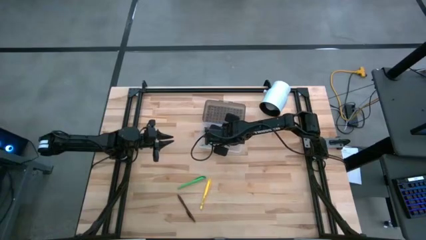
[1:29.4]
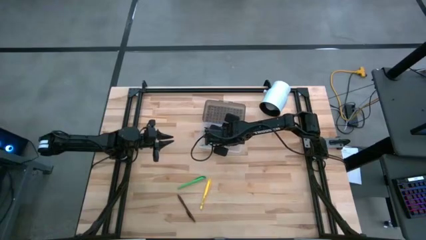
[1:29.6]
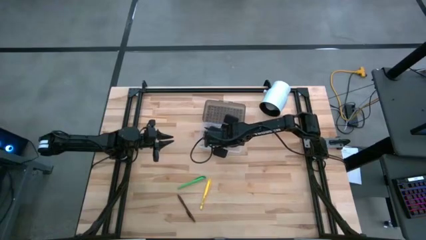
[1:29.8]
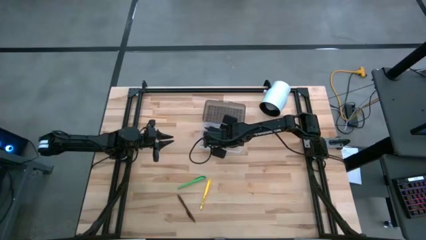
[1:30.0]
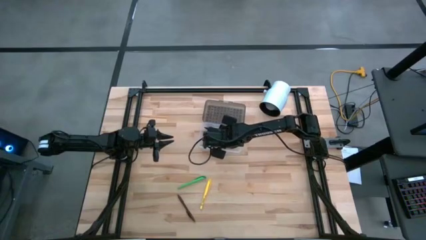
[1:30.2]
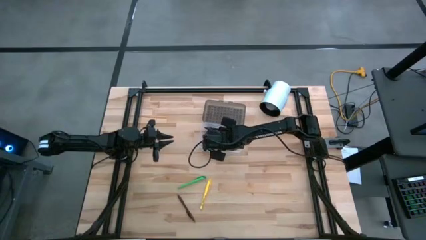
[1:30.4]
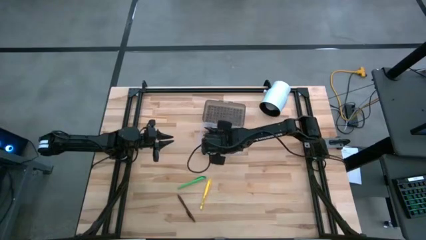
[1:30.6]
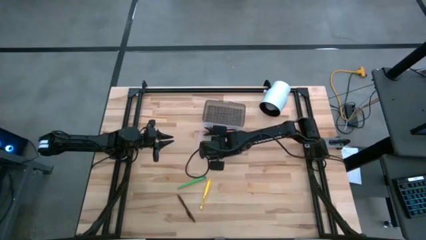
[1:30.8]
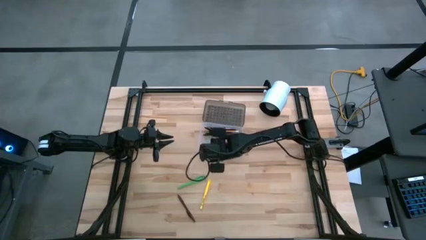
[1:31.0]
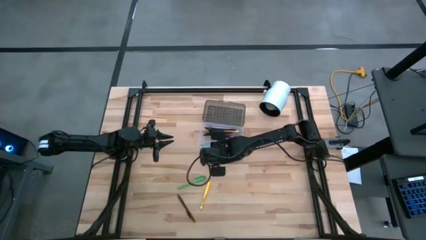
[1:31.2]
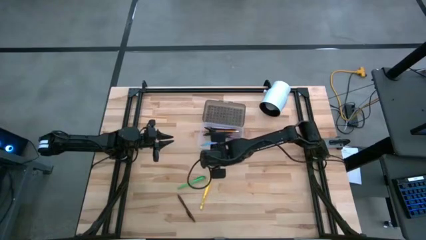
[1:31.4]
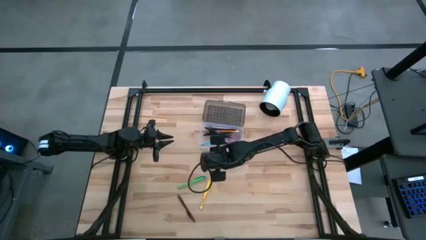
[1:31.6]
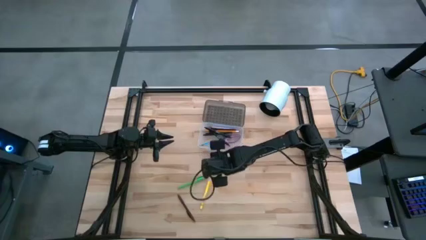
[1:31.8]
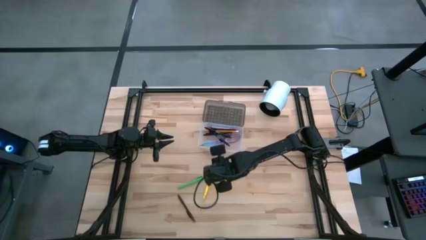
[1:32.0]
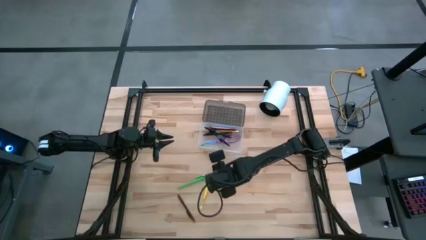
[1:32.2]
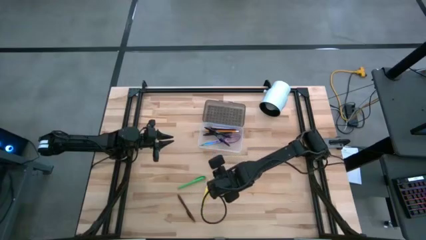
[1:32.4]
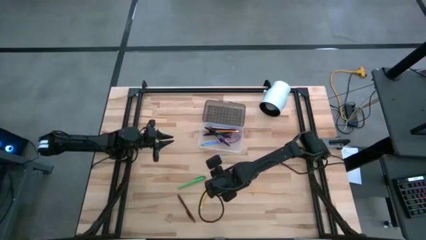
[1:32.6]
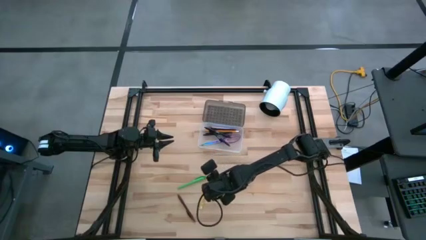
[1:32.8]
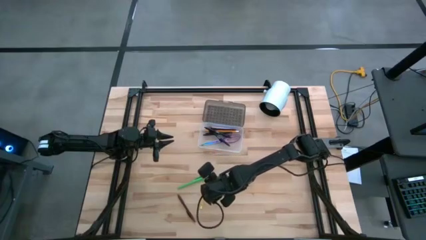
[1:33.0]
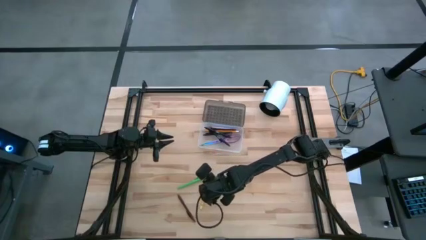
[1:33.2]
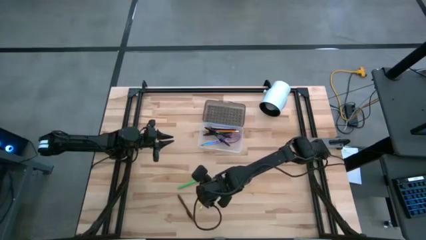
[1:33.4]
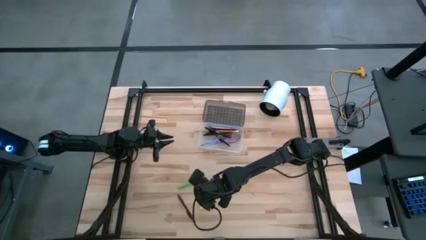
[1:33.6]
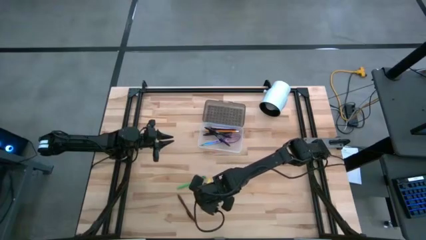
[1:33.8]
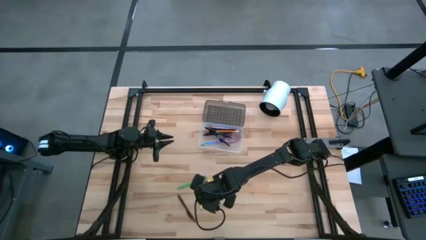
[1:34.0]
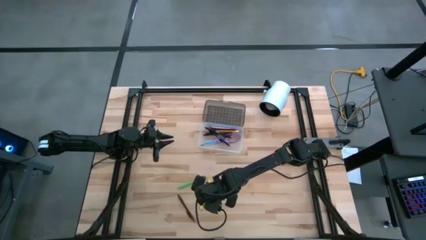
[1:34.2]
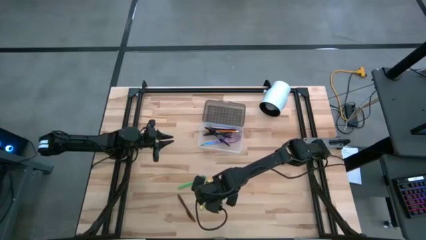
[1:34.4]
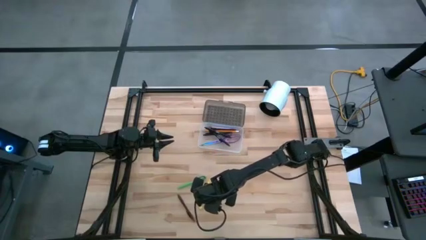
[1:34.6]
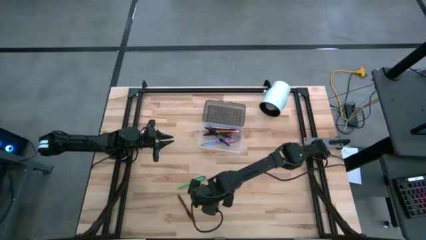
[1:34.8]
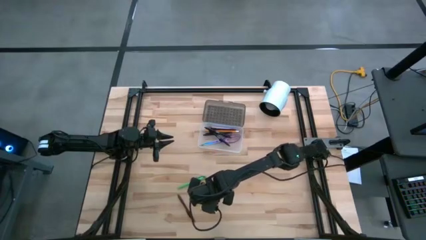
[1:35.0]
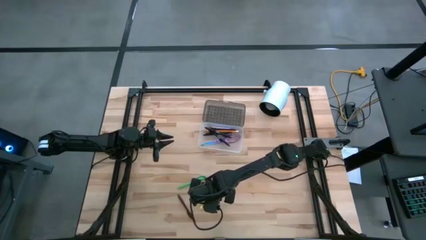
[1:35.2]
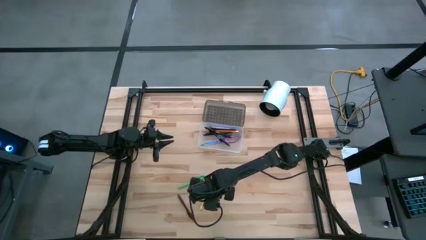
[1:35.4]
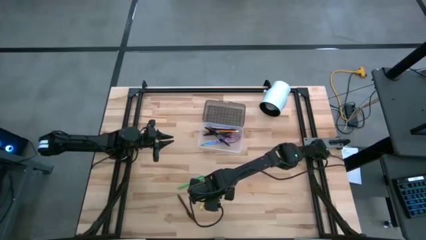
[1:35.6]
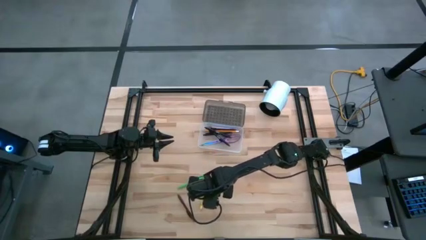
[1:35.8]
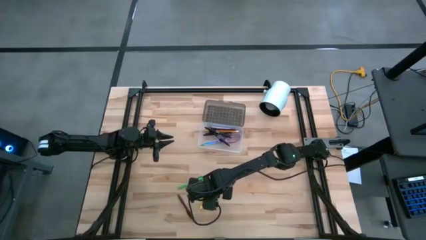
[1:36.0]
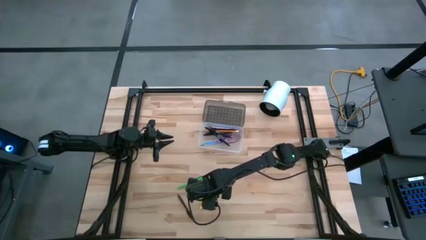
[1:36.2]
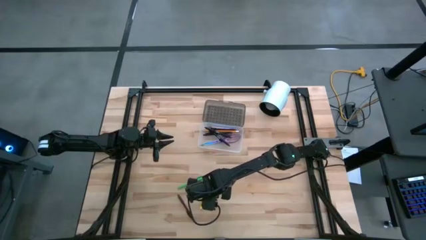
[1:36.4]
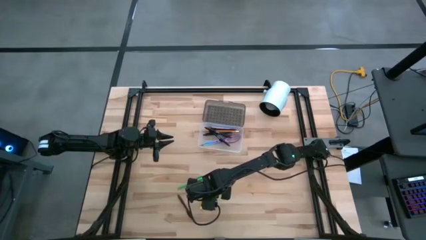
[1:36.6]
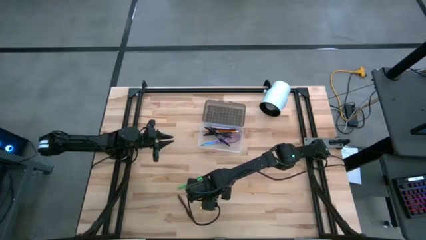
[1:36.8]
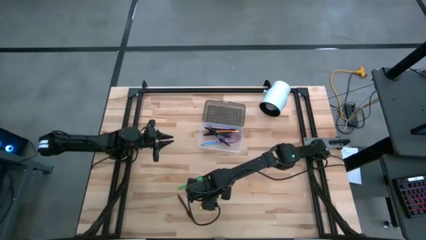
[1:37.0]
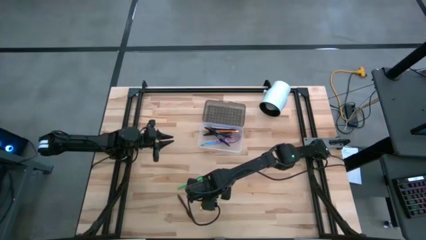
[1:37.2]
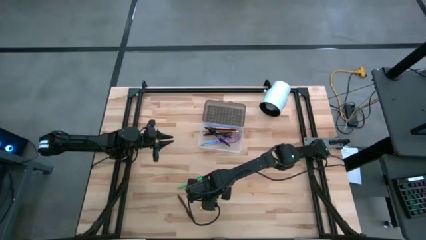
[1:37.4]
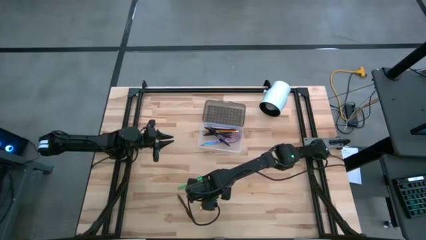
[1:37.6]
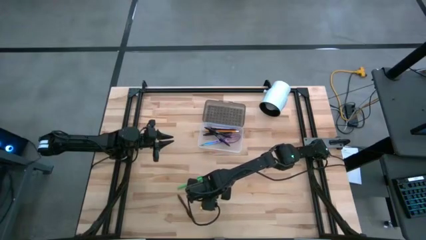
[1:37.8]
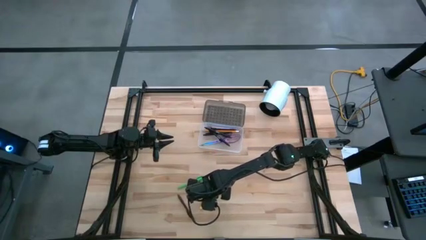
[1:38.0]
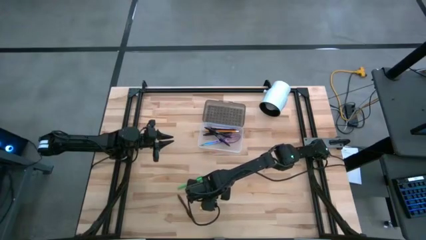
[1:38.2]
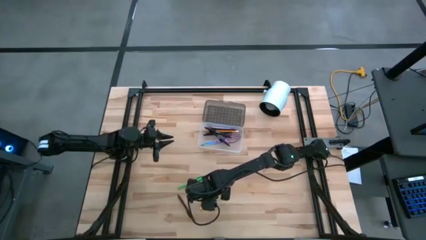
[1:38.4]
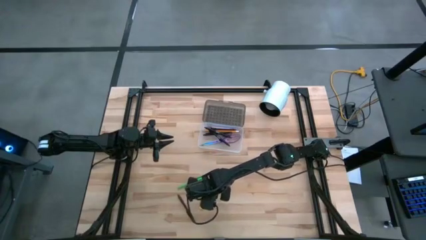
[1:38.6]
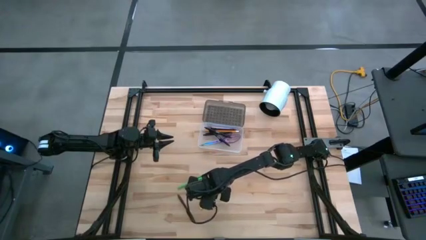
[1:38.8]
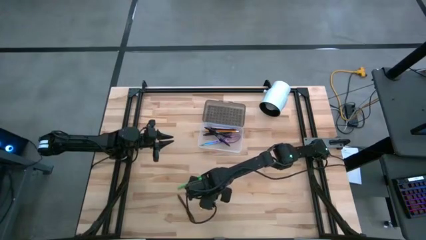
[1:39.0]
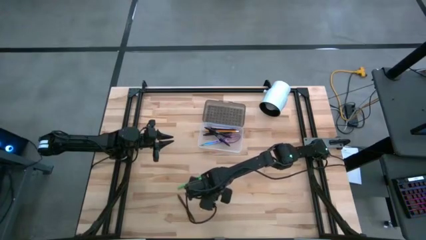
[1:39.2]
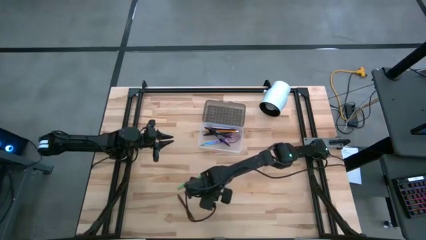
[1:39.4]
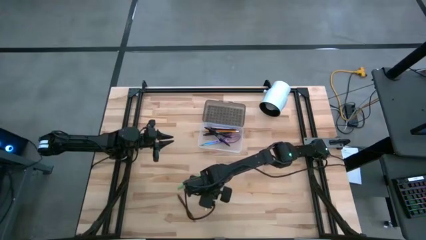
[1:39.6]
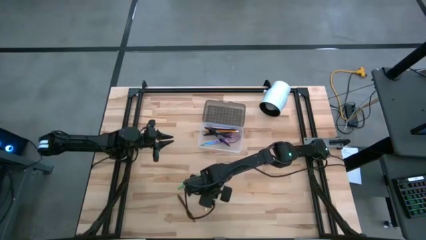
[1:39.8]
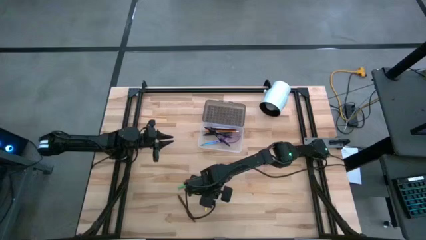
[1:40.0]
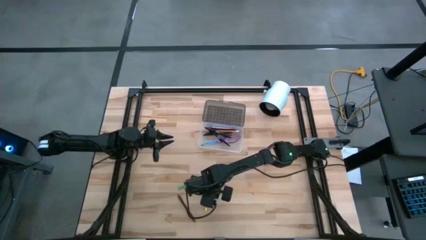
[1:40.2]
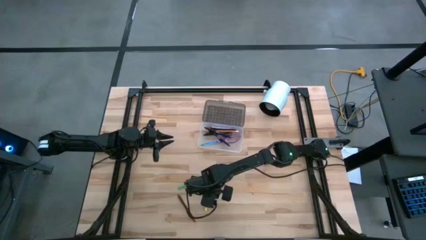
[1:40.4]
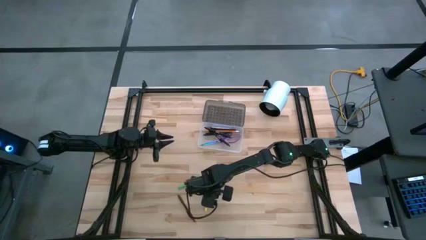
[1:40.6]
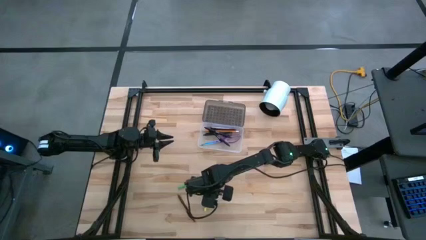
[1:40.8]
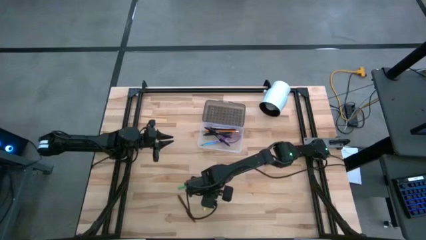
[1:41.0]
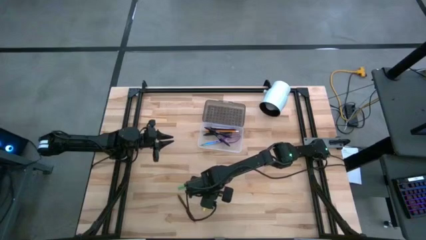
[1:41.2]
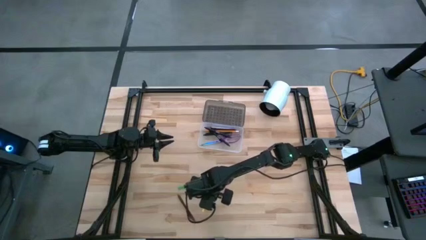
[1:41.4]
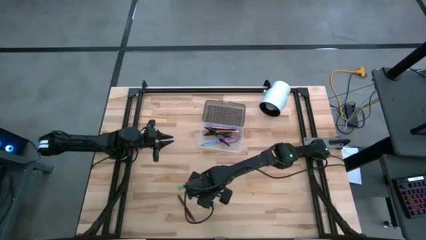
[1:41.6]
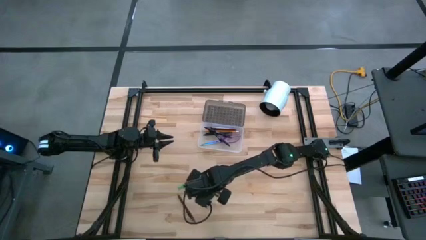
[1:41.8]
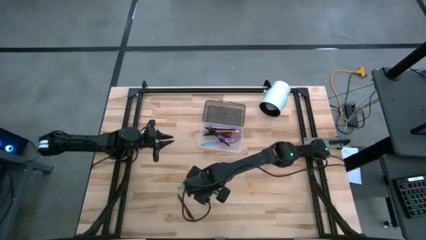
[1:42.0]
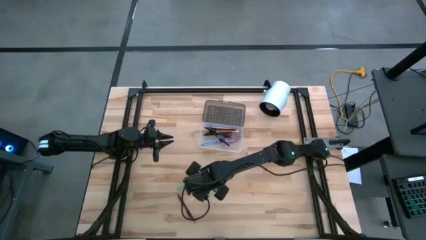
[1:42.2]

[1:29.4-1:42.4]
Task: Pick & place school supplies into a supply box
Put the yellow pen into the supply box
